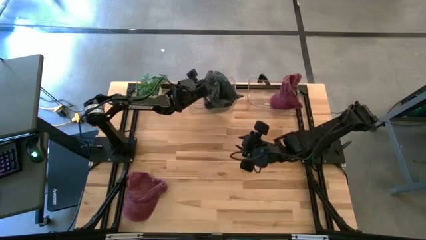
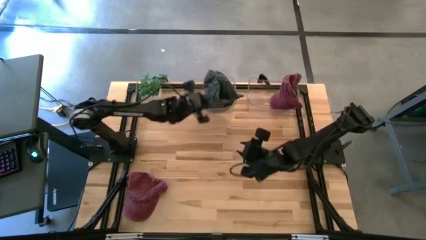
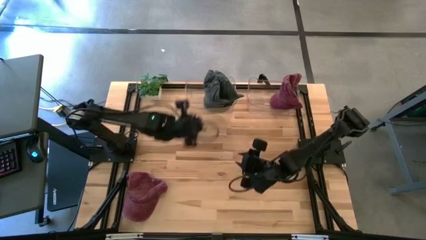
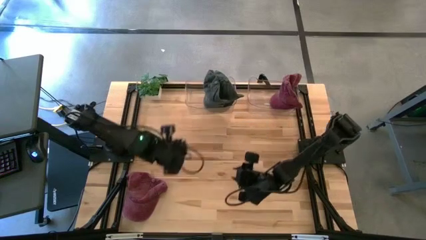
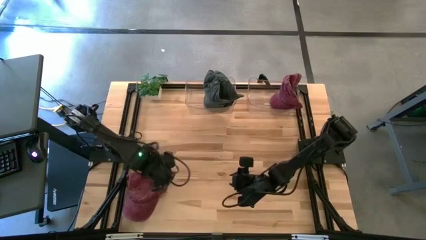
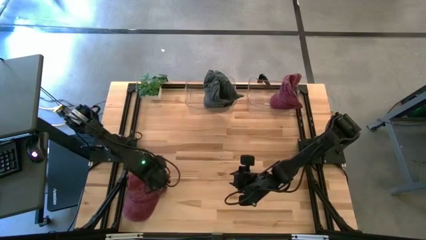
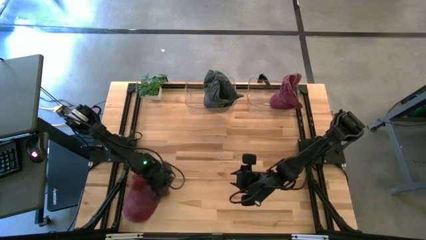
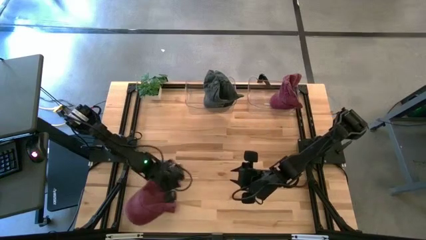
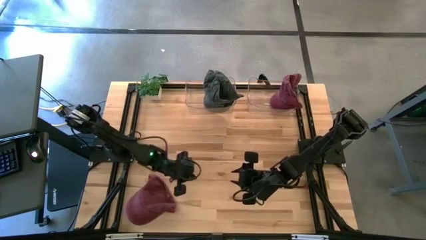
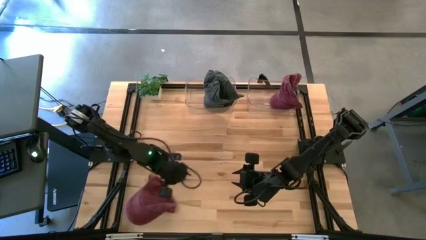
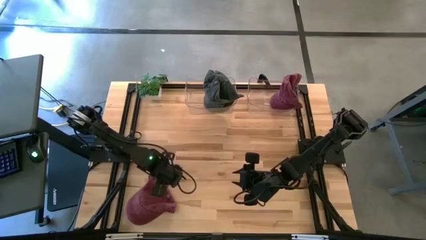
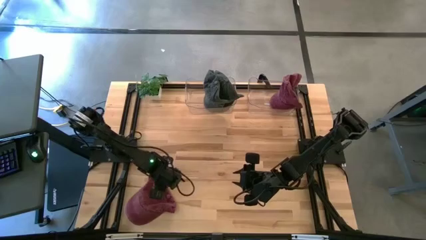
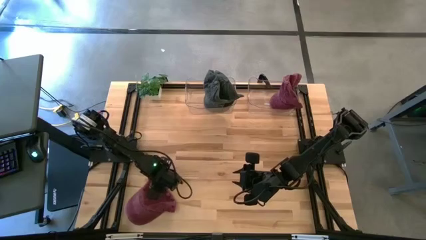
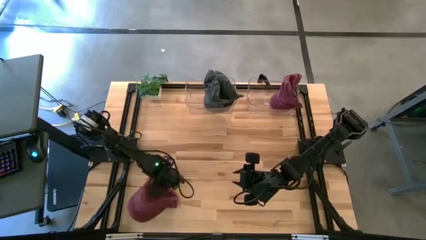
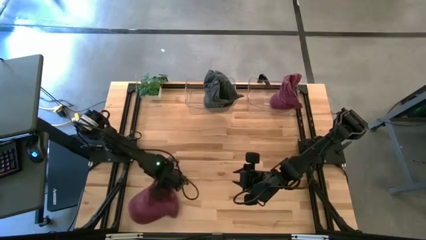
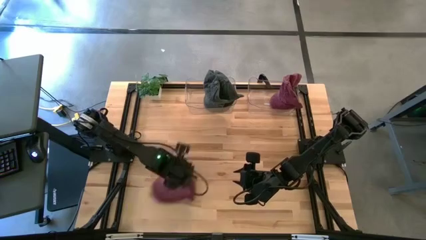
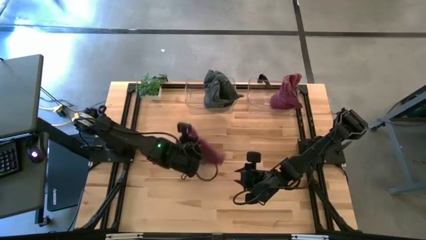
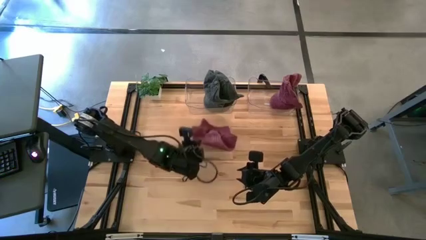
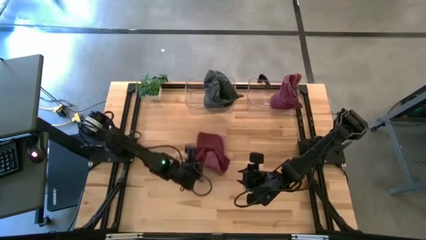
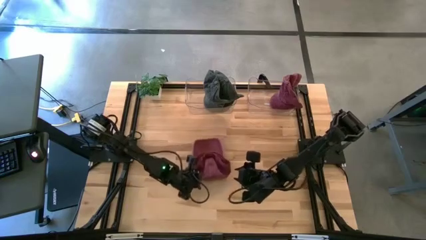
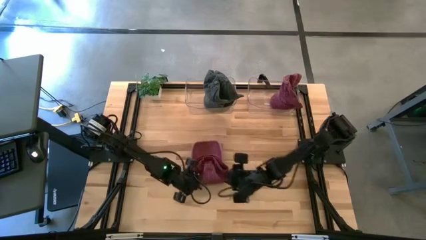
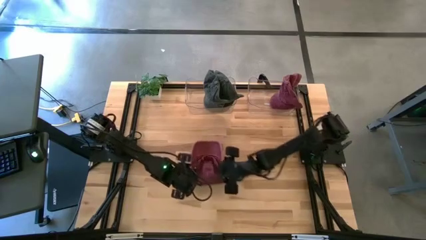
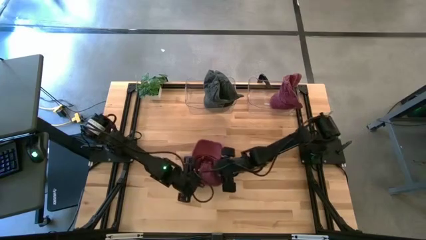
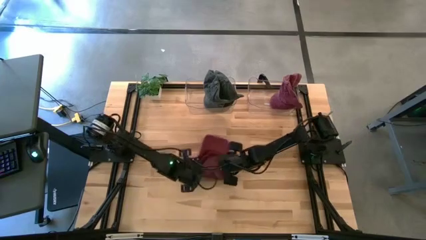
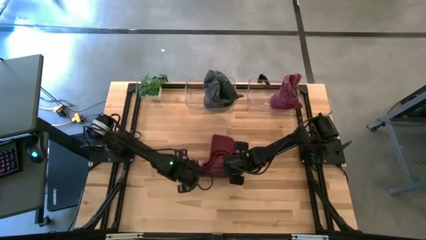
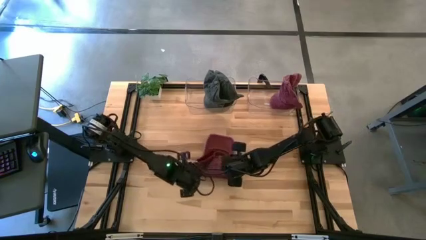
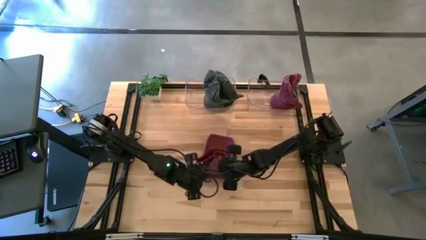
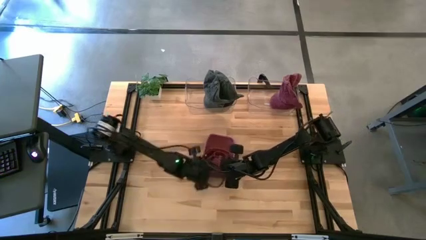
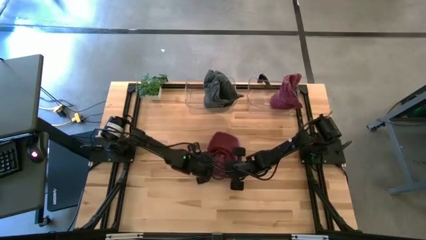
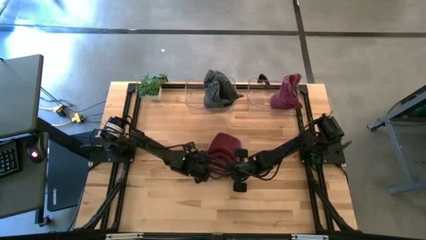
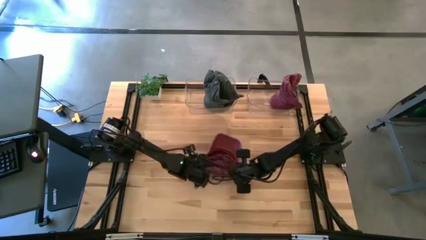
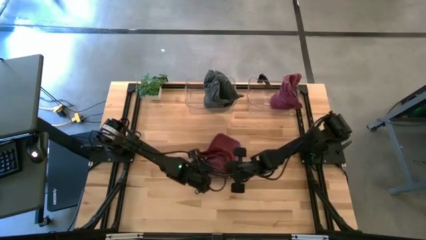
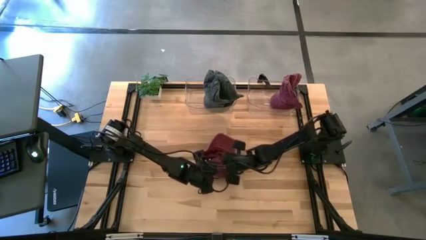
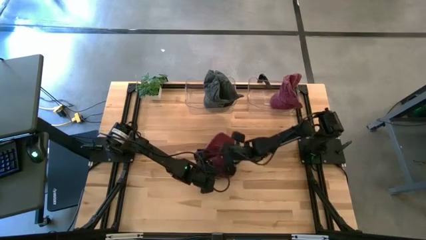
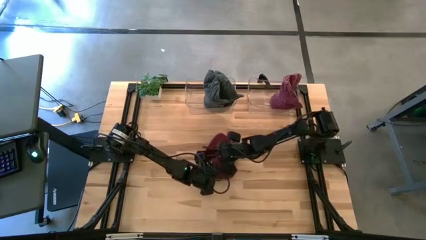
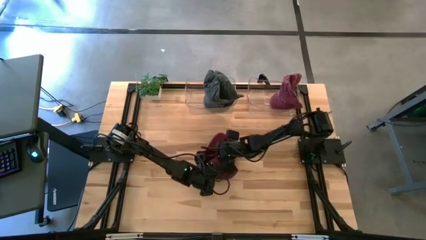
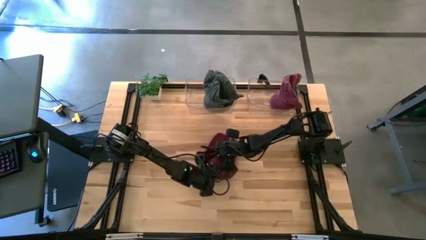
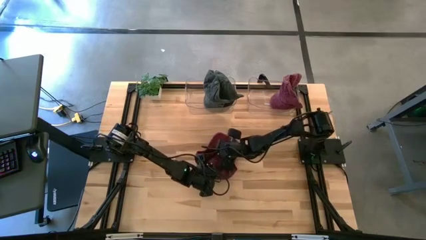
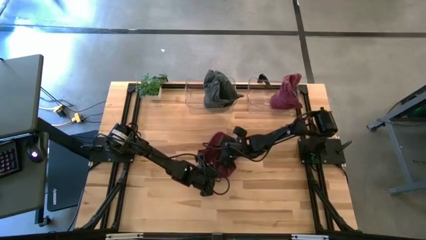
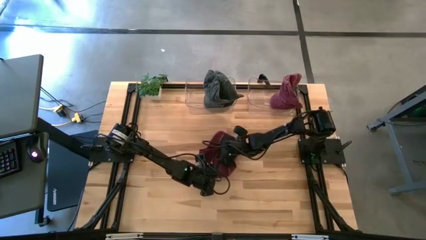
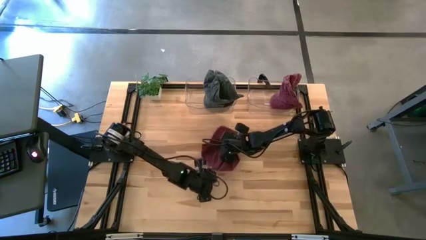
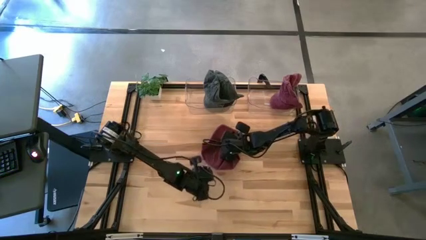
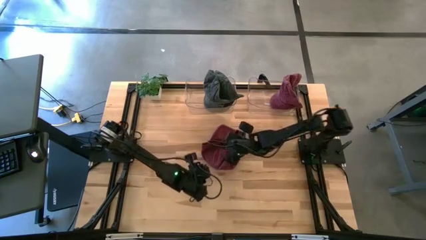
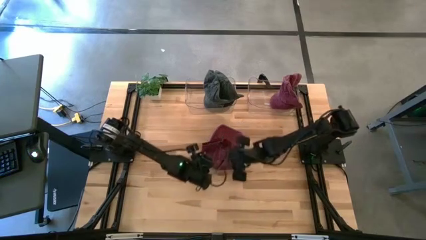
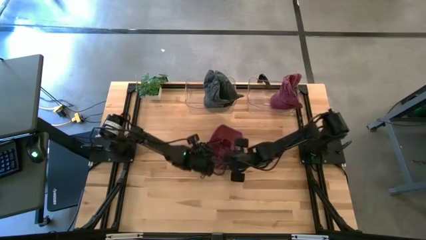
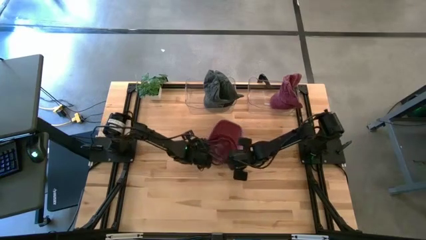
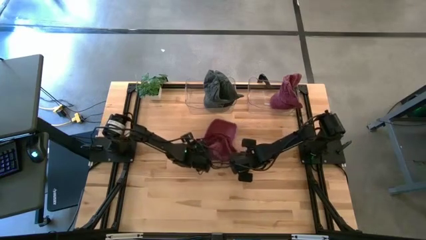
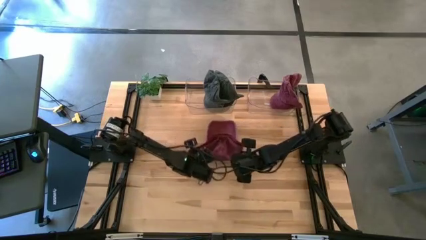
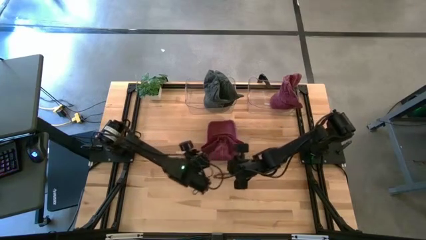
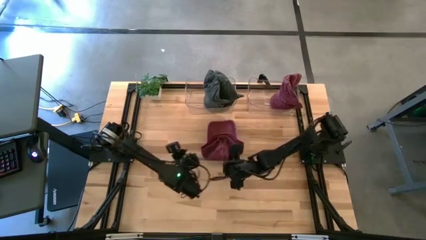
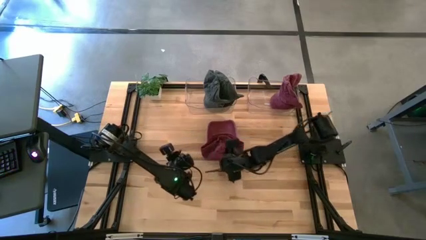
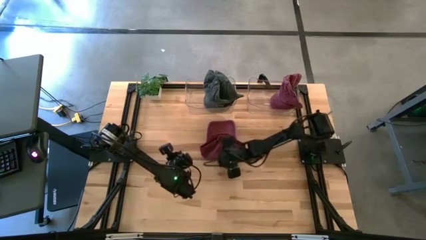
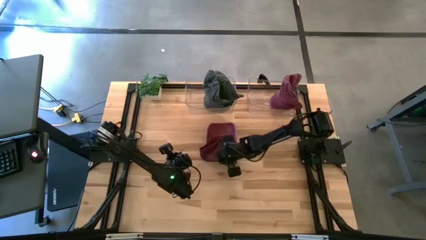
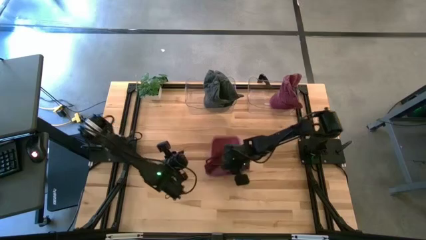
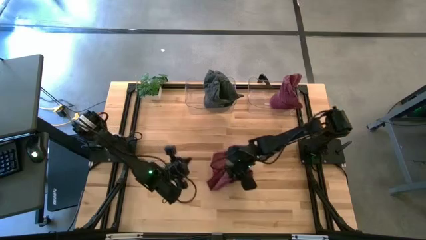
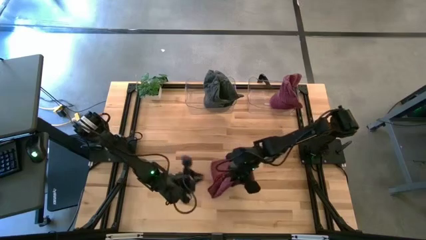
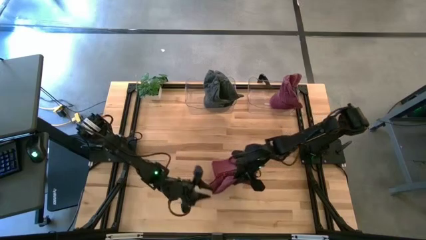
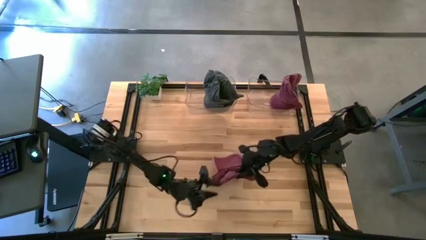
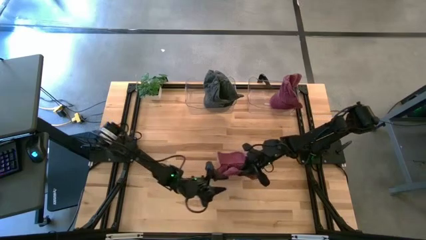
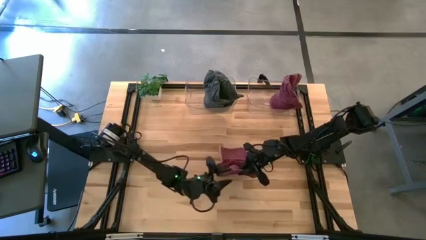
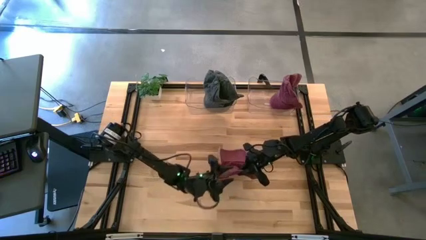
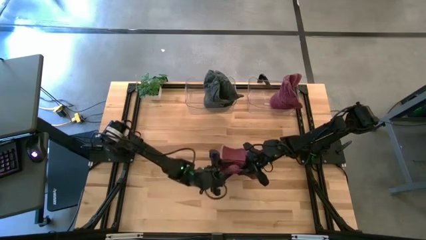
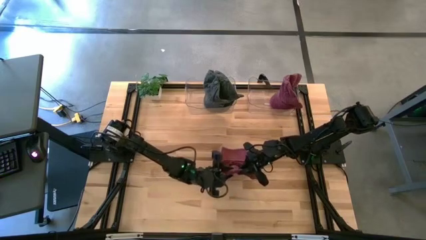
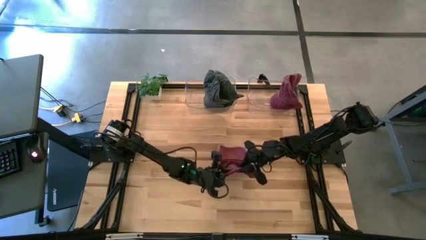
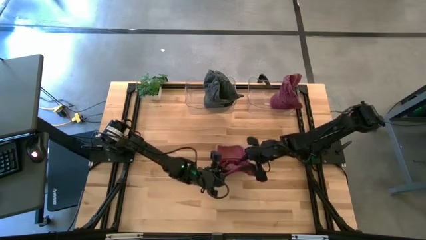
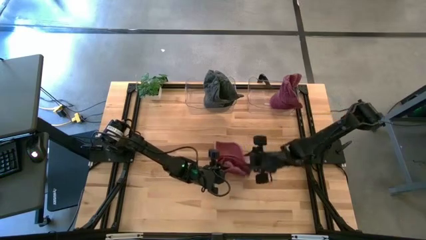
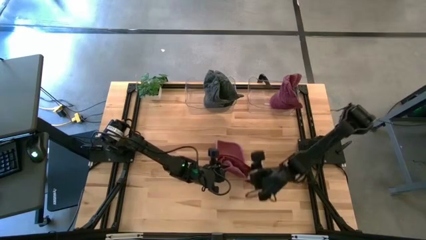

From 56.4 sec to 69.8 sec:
Task: Pick & Place hat
Put the red cap into the right transparent bin
